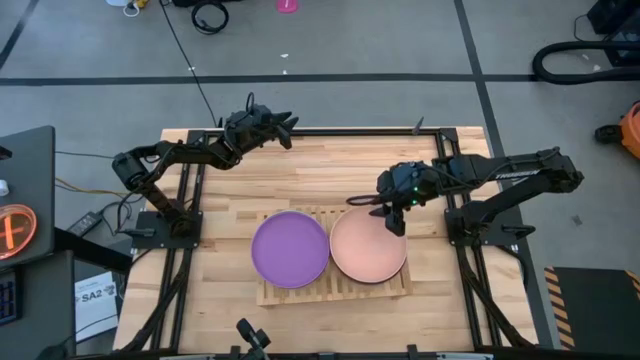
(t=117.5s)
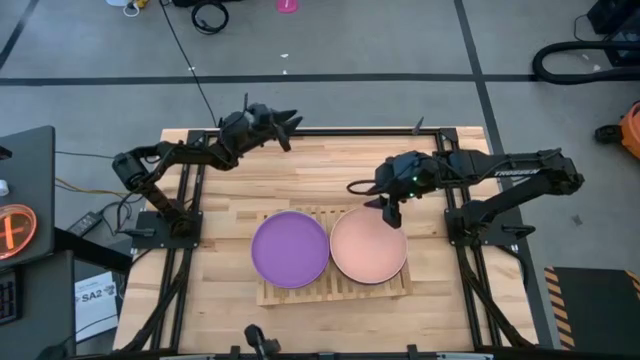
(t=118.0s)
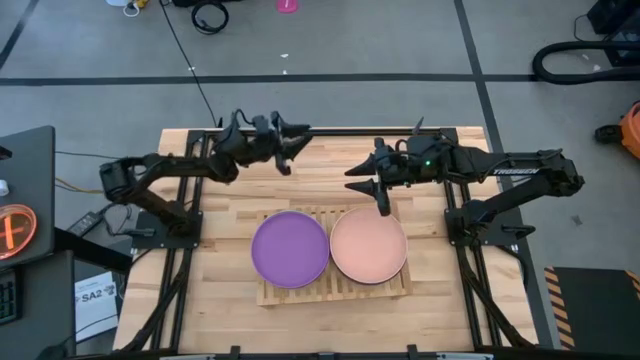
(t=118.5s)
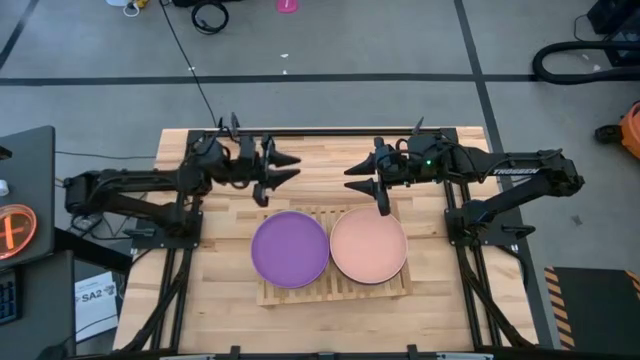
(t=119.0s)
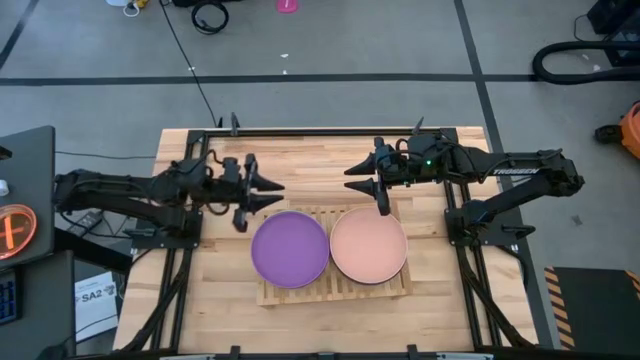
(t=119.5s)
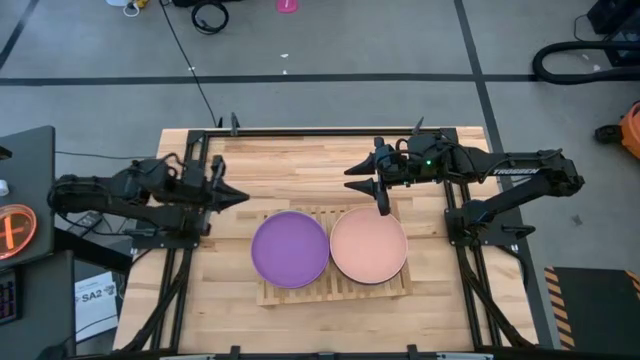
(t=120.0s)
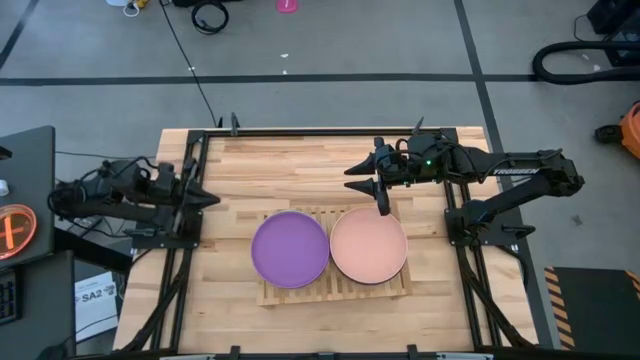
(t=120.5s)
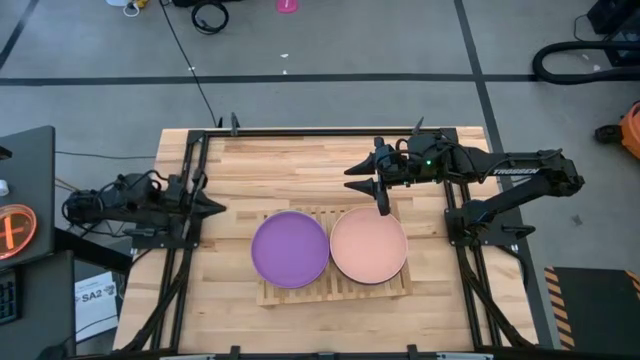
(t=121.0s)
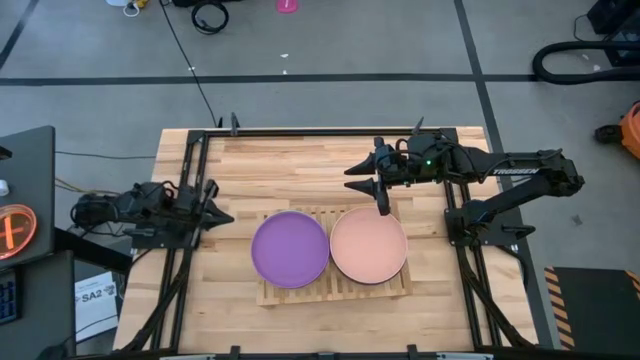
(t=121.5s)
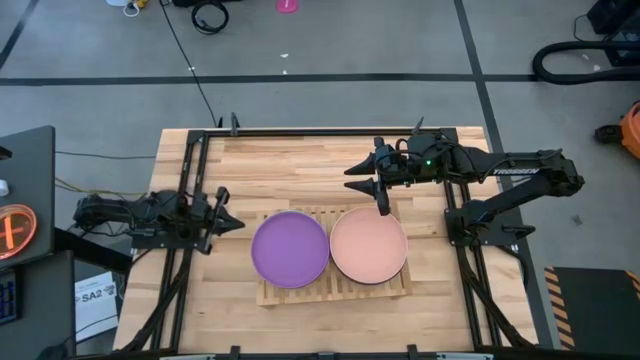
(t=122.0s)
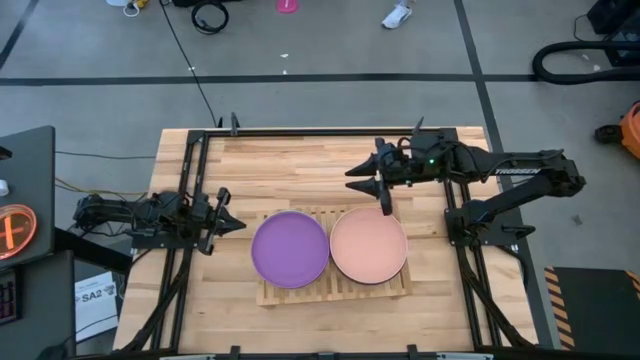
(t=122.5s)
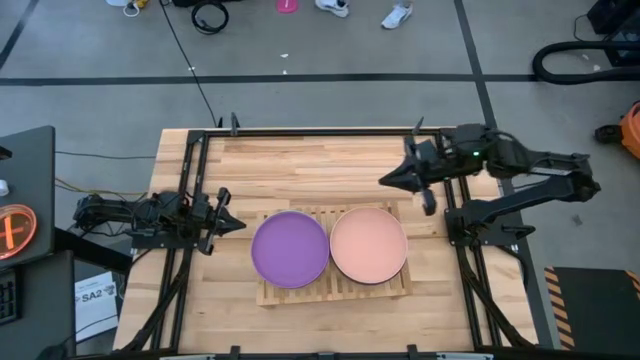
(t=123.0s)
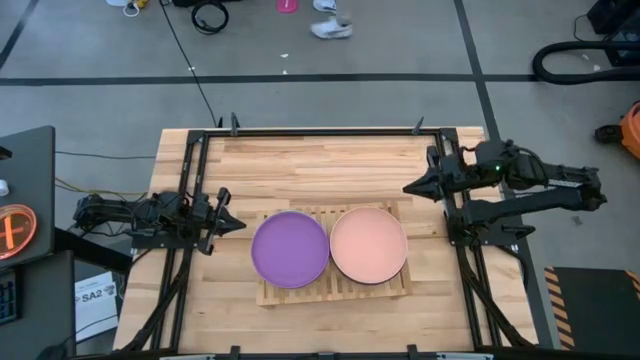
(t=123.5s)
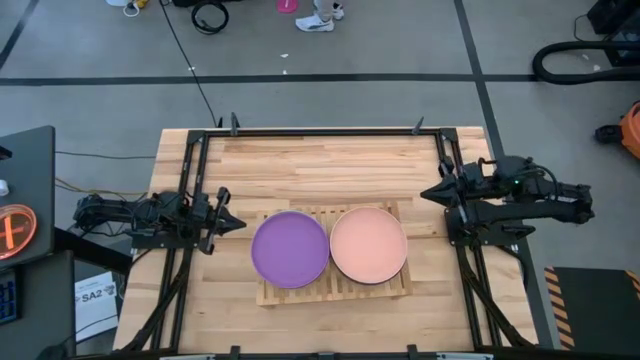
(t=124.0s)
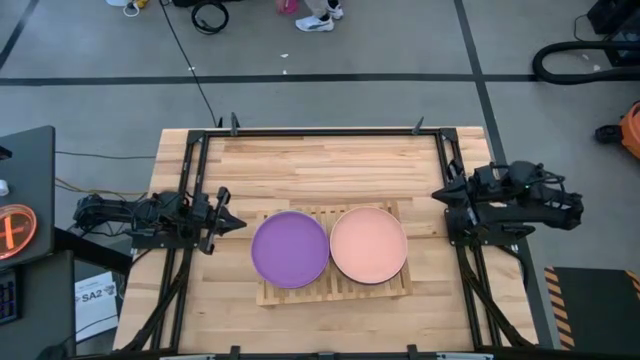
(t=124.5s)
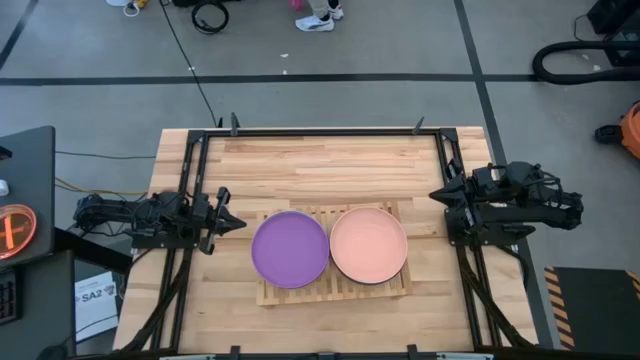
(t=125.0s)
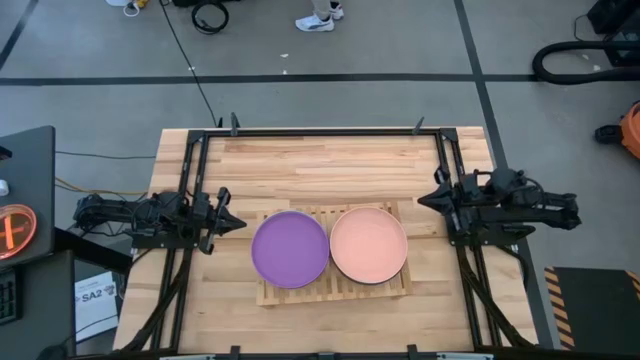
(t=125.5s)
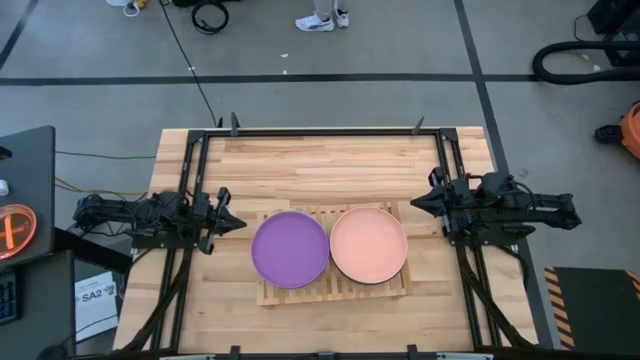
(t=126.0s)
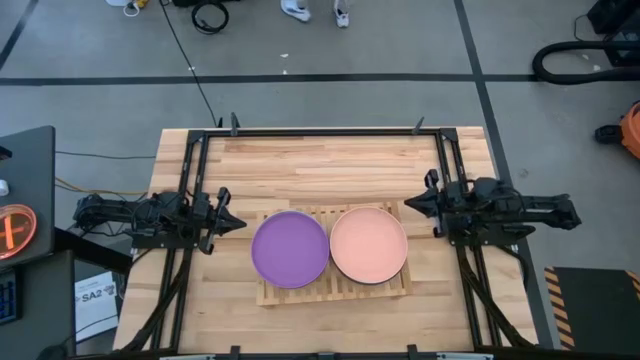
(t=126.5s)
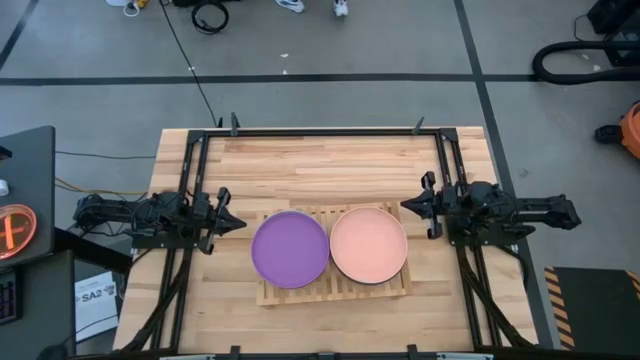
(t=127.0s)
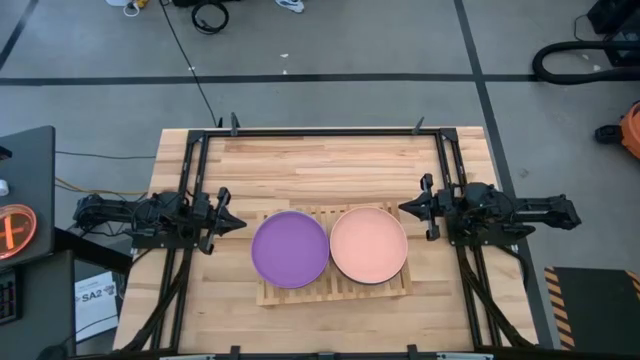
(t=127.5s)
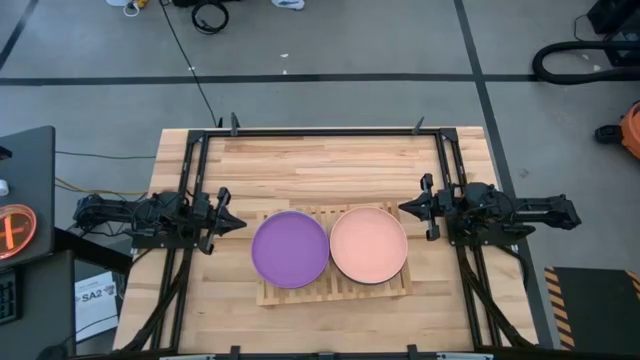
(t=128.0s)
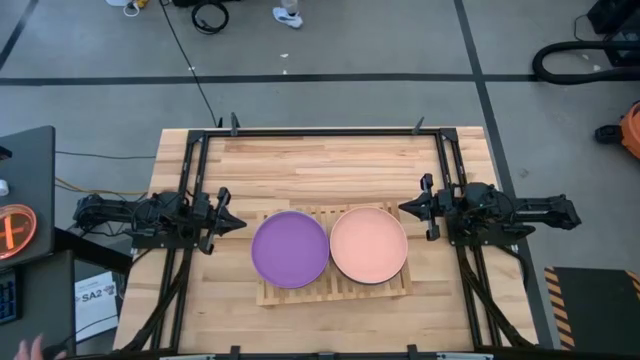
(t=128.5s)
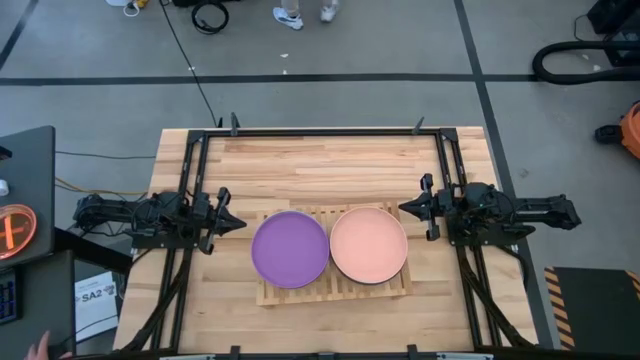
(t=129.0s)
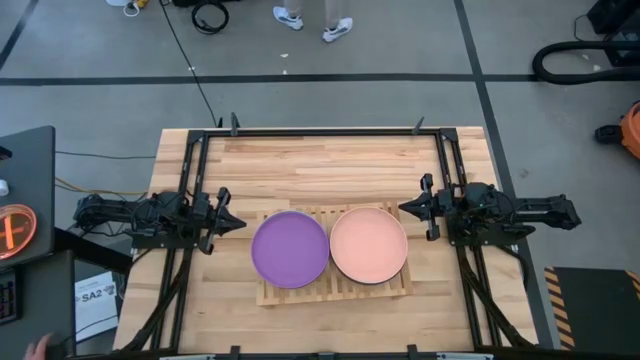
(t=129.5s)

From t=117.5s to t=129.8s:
Task: Place and stack plates onto a shelf
Return to Home Position

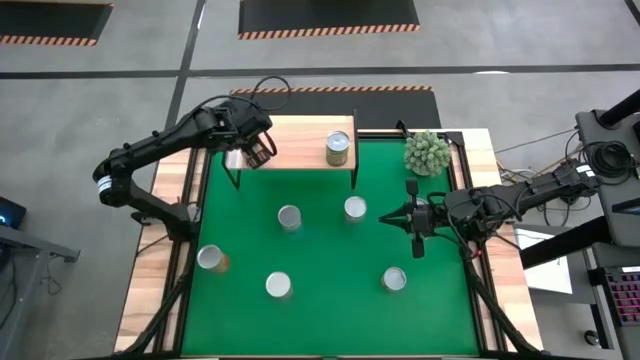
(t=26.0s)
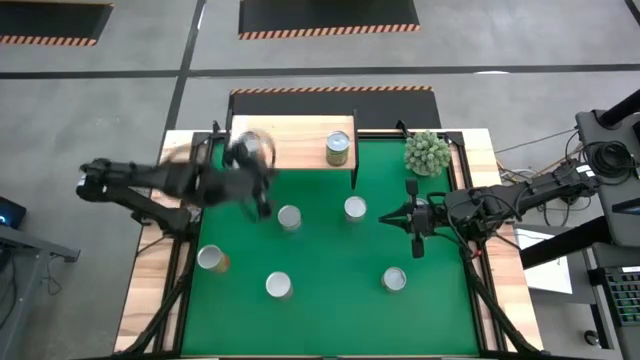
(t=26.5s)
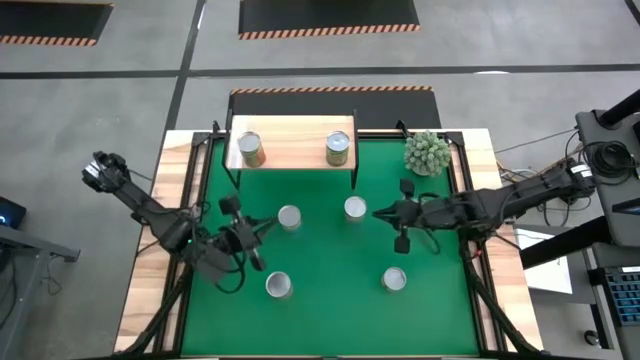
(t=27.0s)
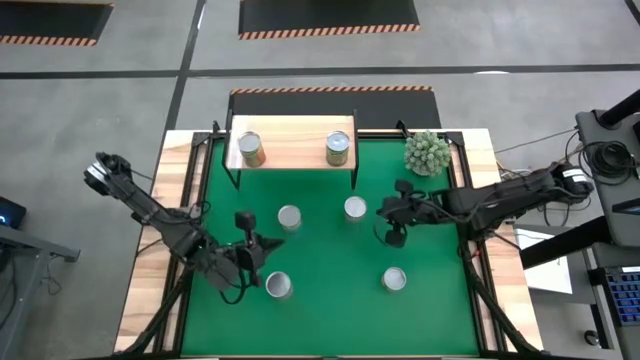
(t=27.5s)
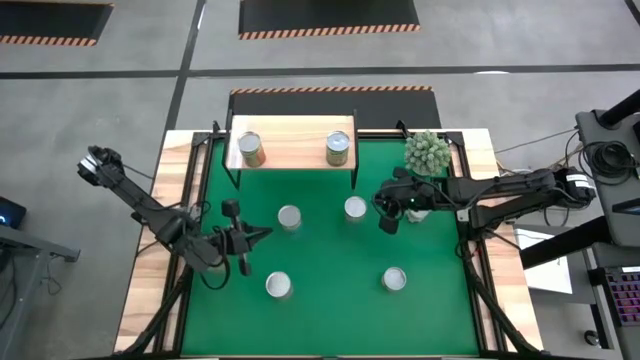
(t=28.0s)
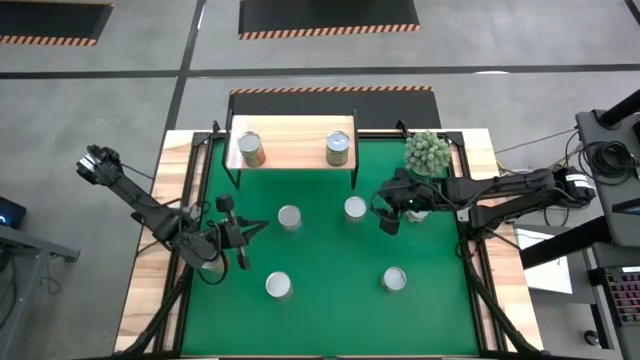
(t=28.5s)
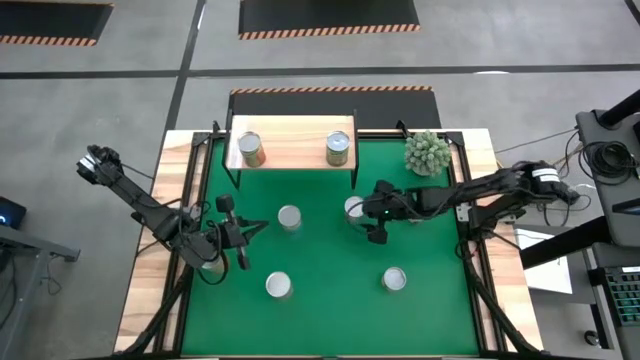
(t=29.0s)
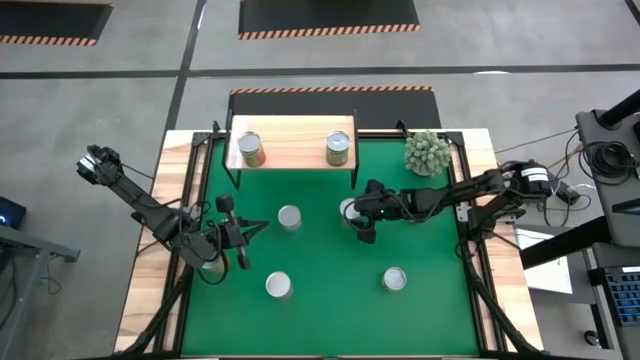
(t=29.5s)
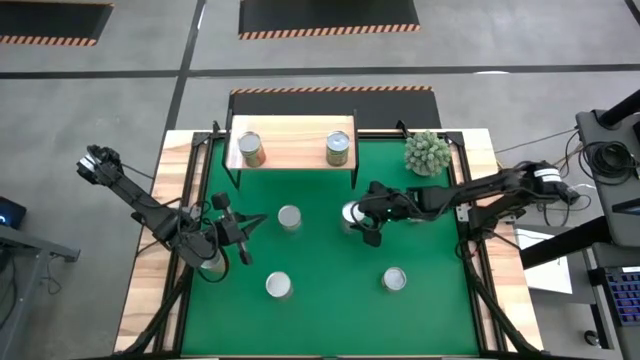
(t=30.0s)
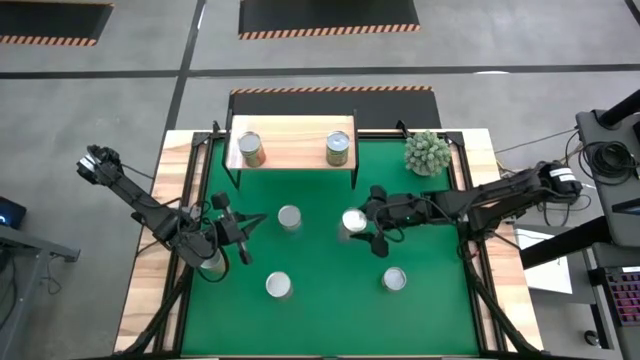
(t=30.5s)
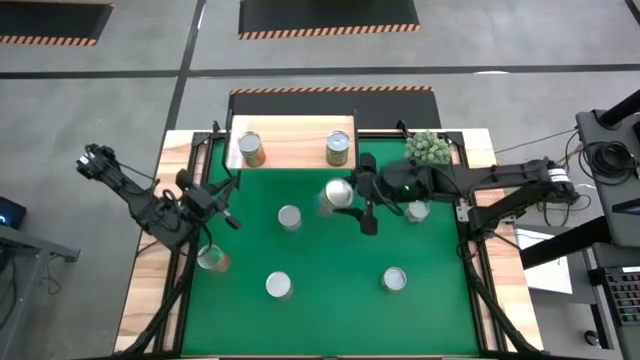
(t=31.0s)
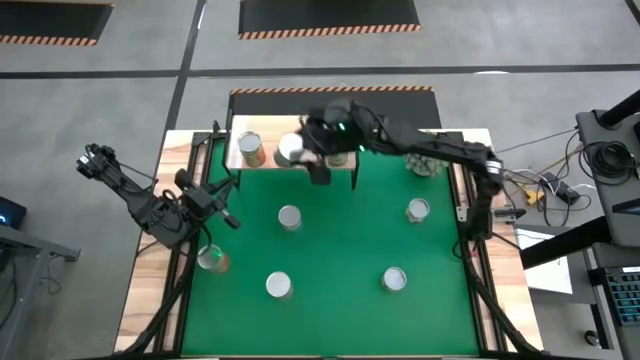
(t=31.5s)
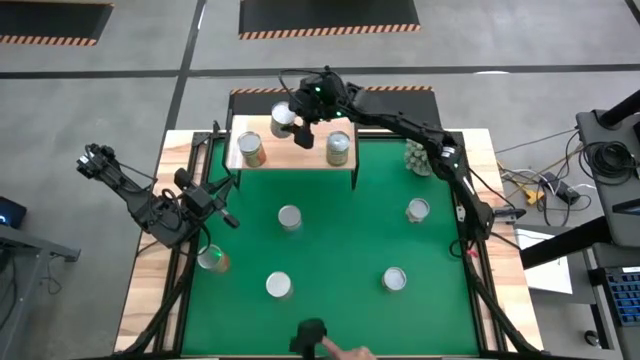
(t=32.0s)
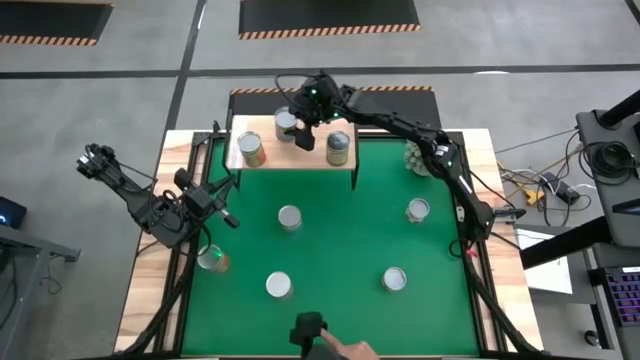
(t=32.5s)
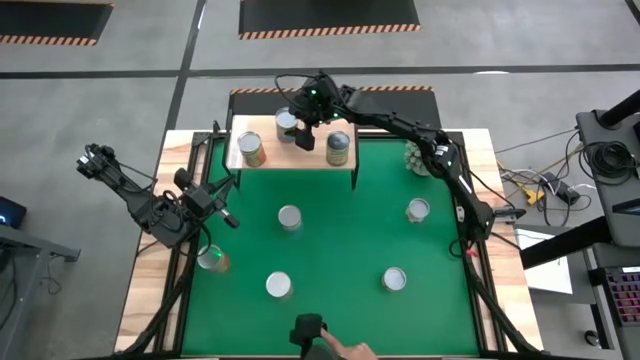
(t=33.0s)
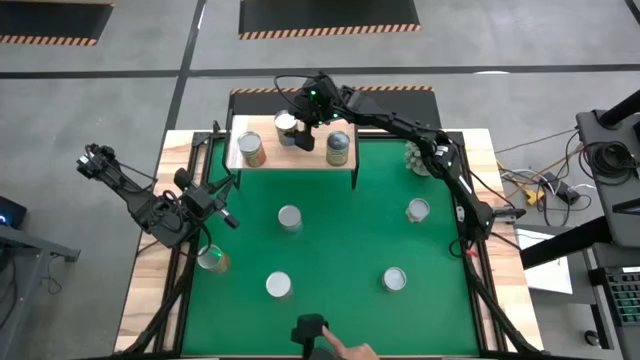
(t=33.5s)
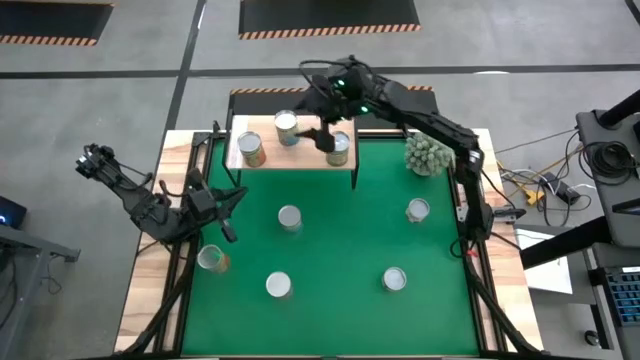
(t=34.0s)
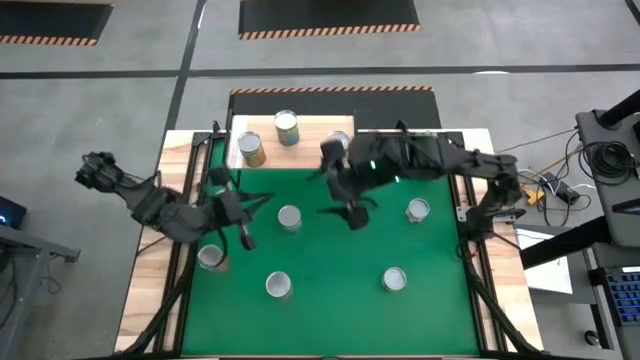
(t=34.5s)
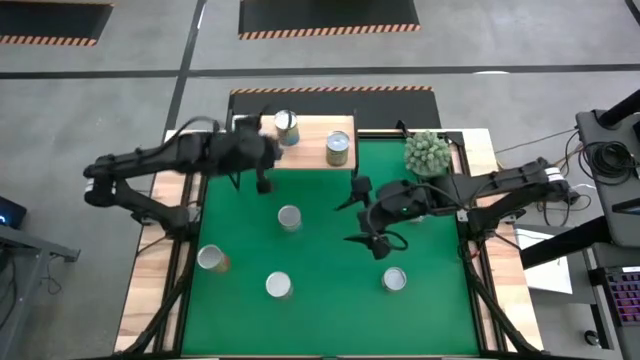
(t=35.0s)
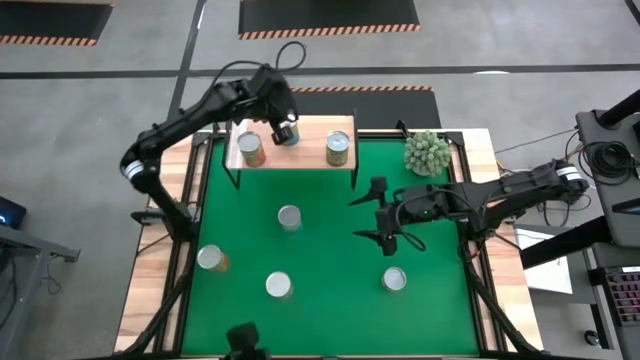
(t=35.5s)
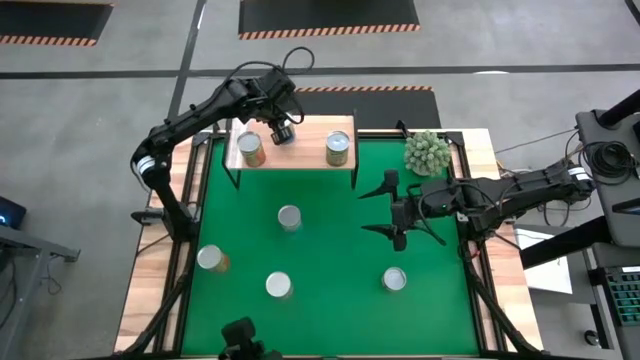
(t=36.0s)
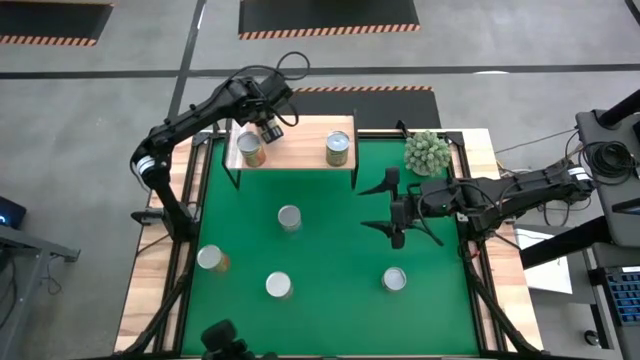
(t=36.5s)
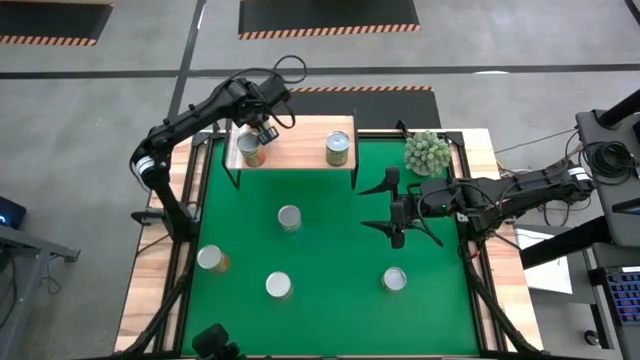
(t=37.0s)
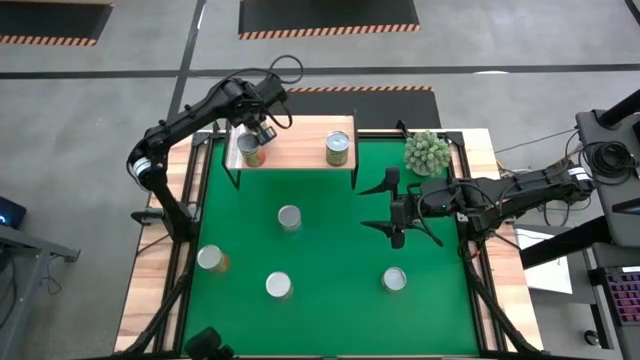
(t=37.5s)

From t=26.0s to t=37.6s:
Task: Pick and place cans onto a shelf
Put the canned cherries on the shelf
